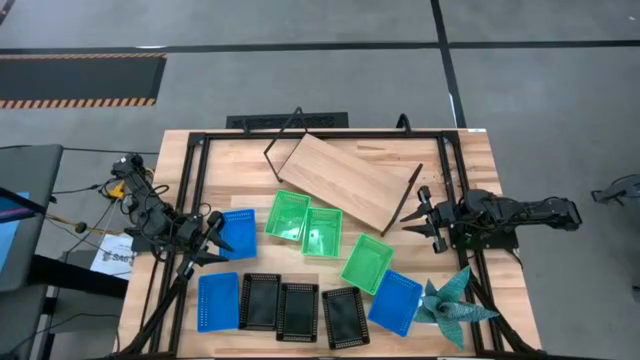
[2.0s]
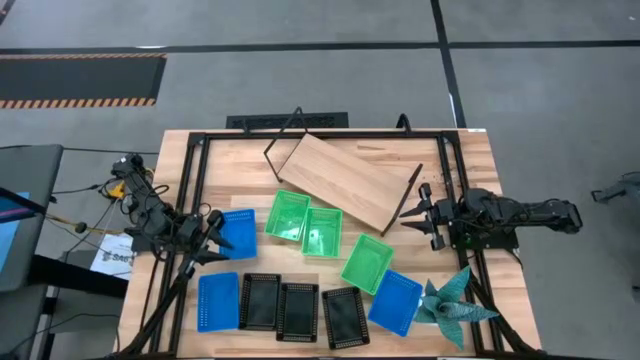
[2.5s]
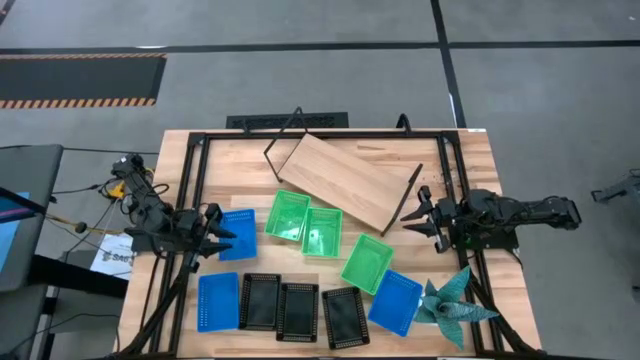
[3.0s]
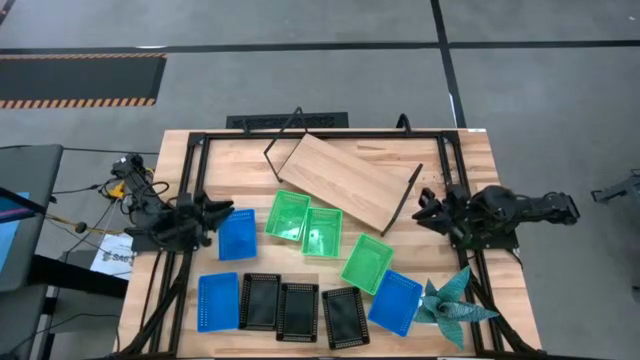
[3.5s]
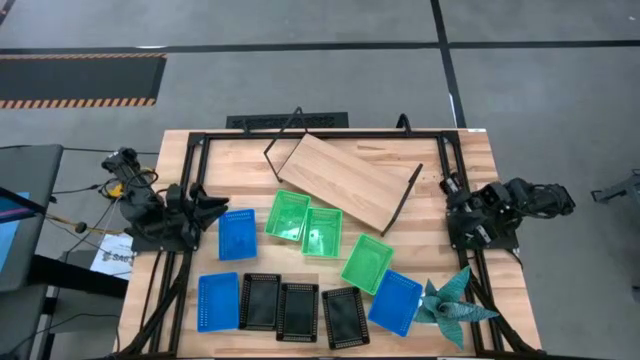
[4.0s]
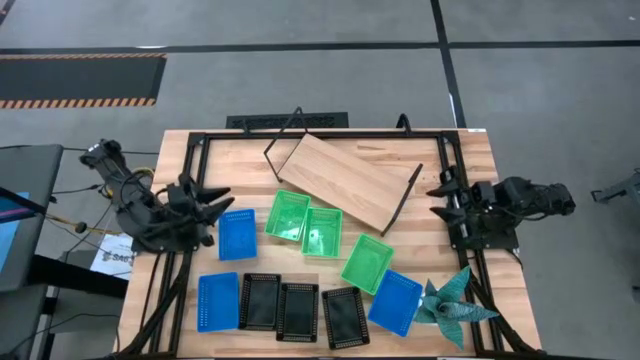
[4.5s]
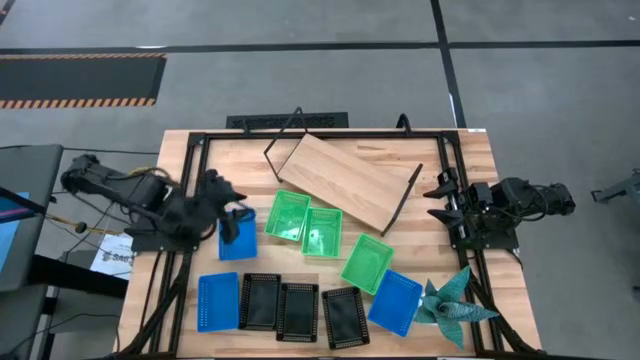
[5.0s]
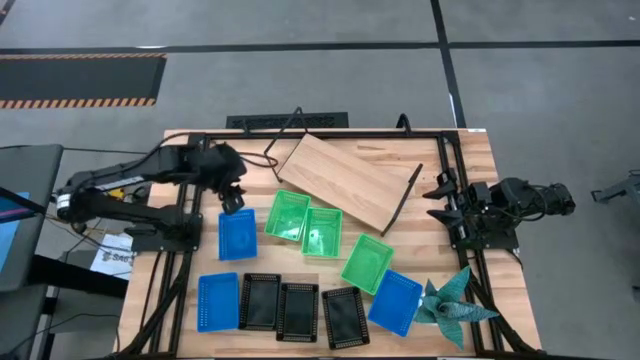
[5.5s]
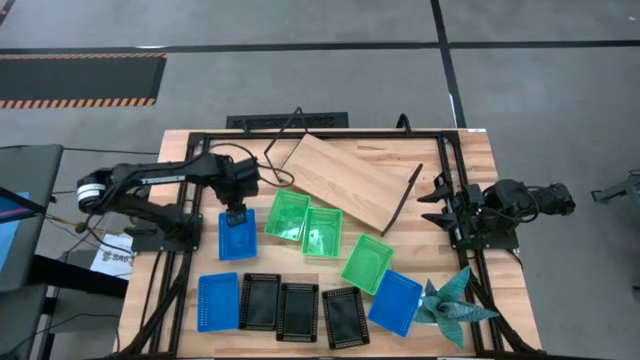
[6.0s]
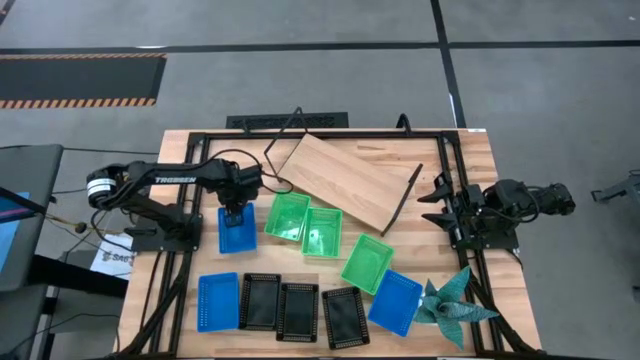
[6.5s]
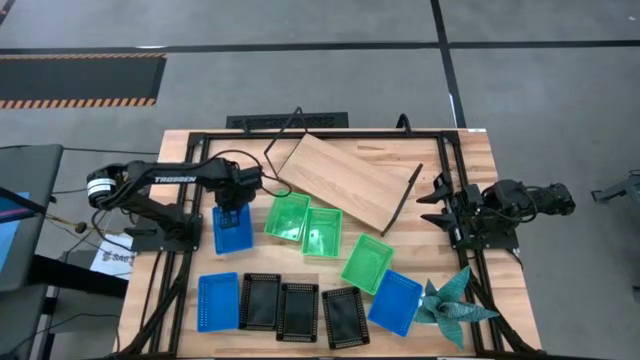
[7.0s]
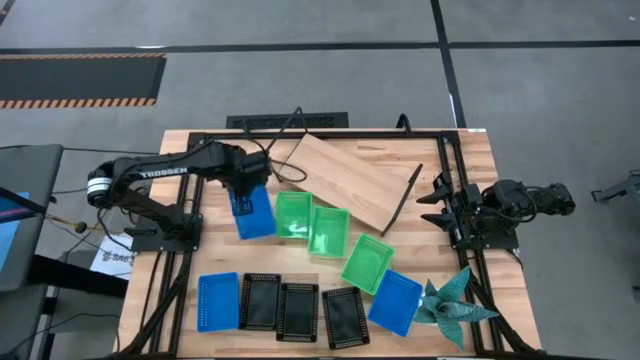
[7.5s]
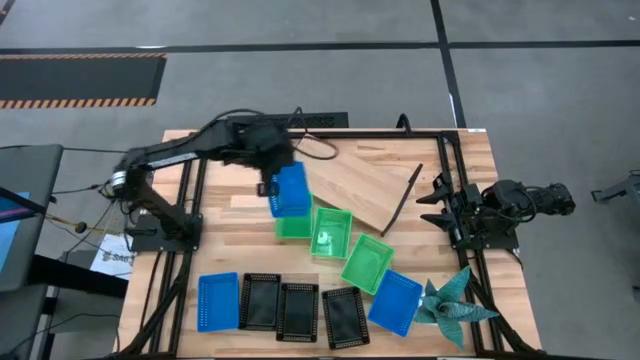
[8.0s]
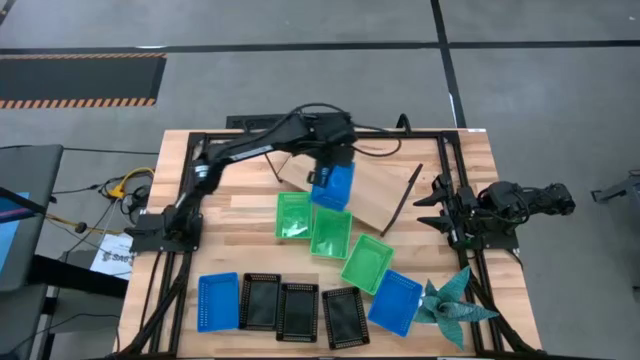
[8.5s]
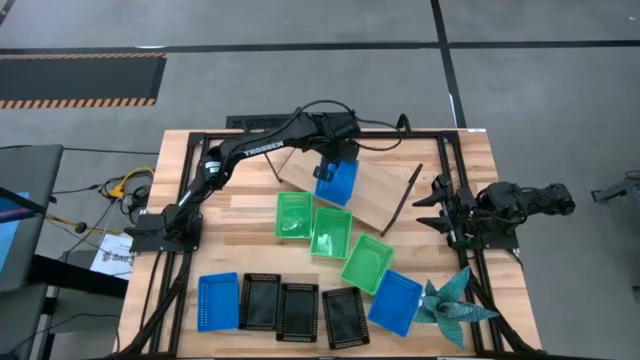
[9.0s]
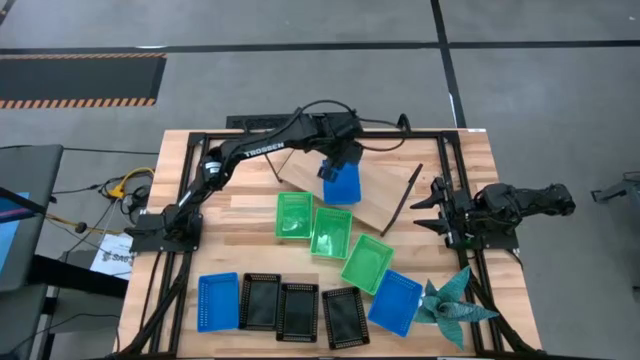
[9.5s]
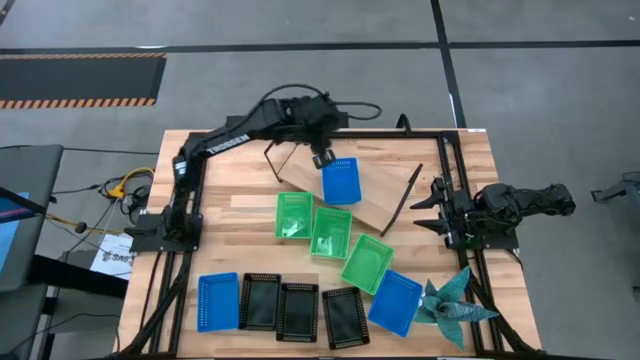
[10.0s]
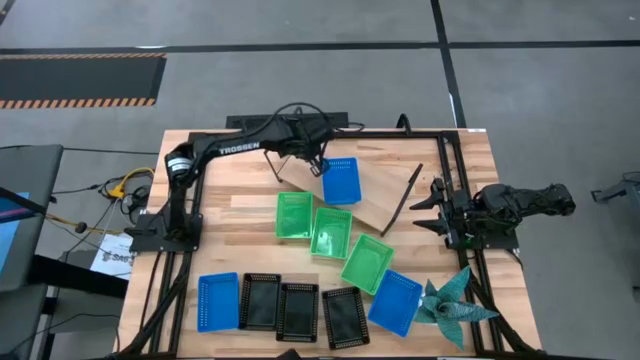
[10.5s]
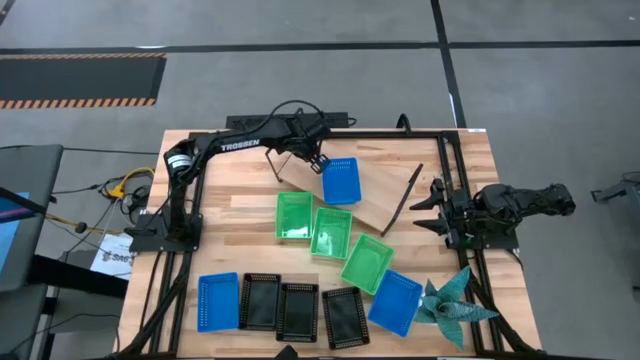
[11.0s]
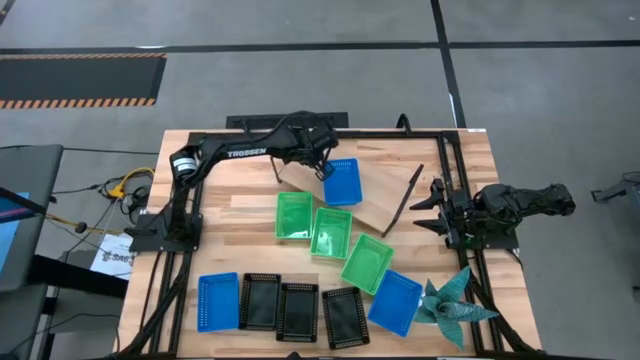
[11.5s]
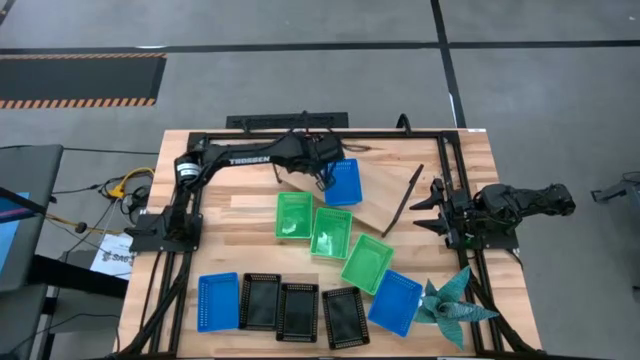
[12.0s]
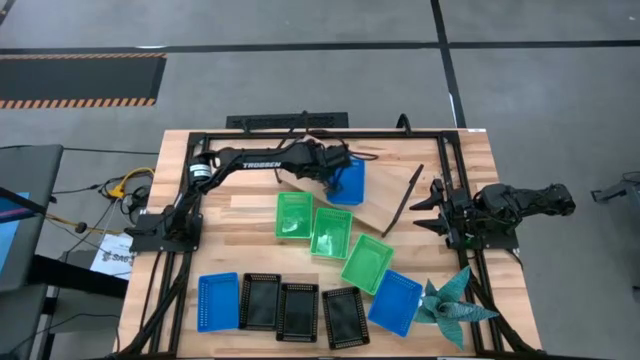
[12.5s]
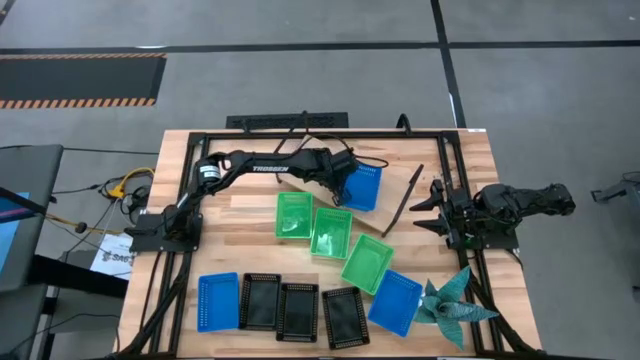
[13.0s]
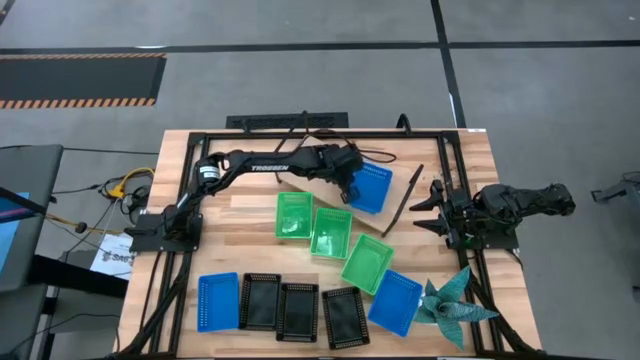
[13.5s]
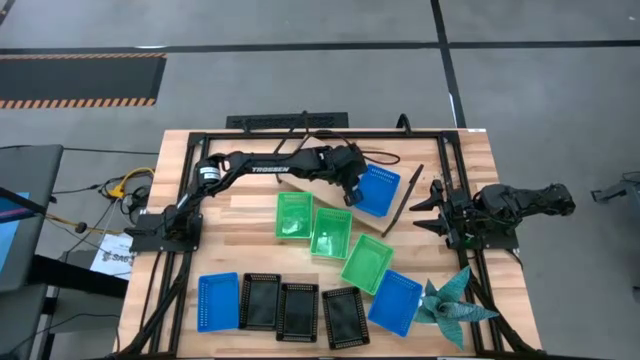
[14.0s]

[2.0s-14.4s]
Task: Stack baskets on shelf by color
Put the top left blue bin on the shelf

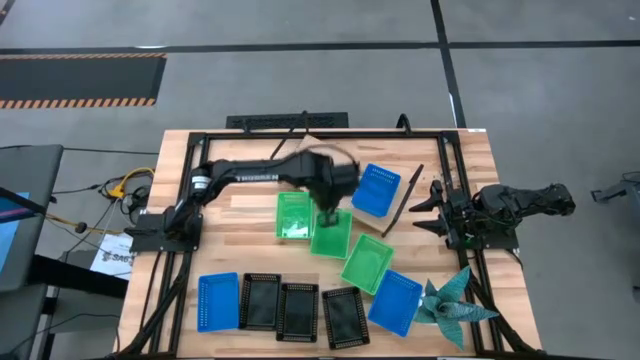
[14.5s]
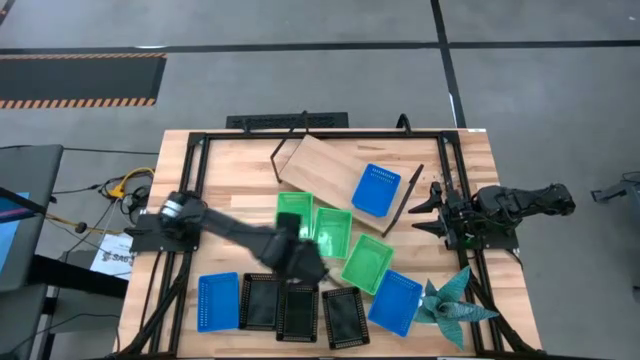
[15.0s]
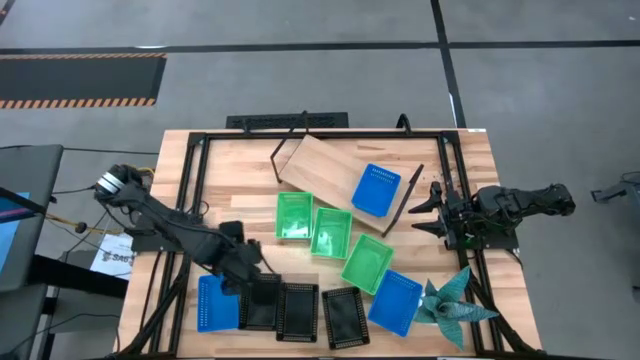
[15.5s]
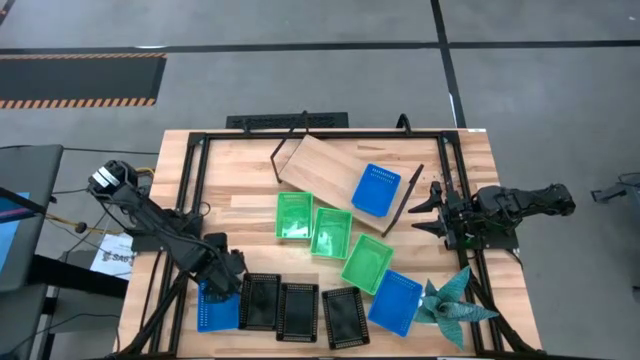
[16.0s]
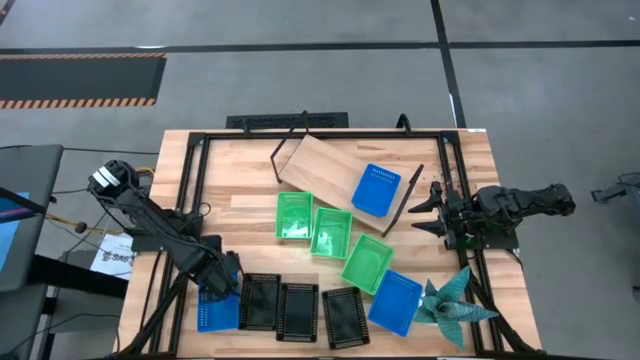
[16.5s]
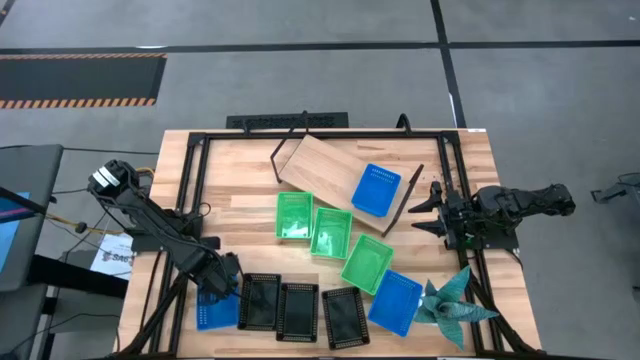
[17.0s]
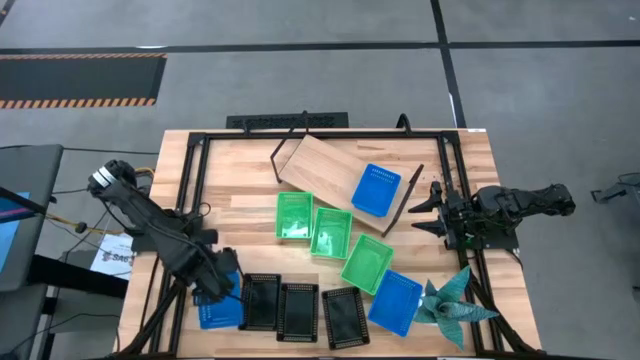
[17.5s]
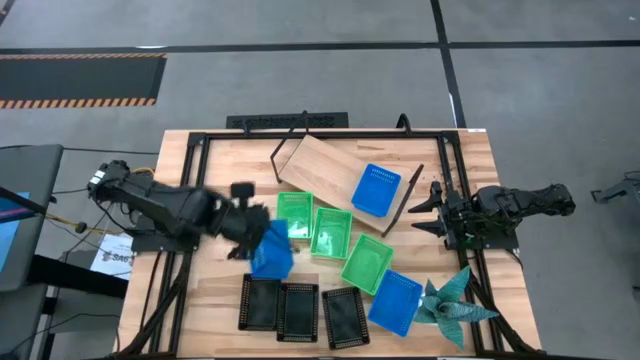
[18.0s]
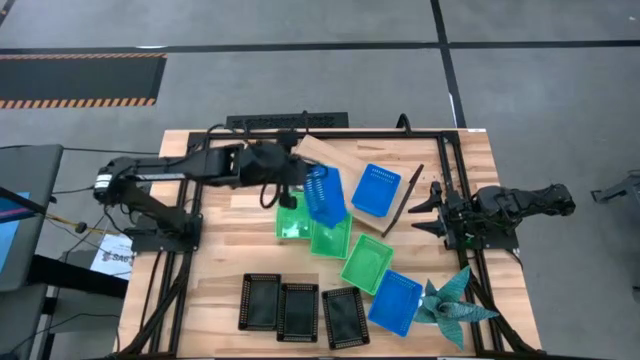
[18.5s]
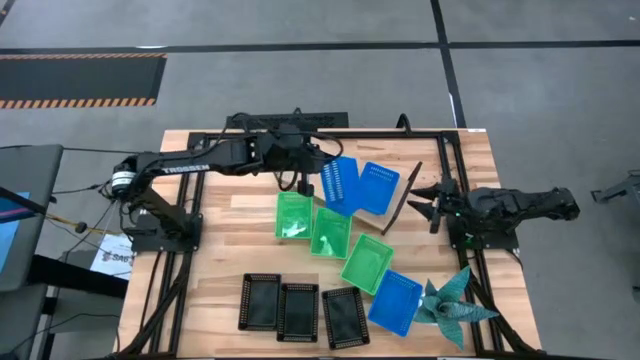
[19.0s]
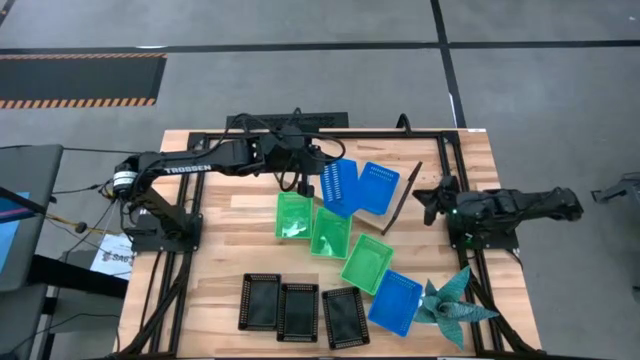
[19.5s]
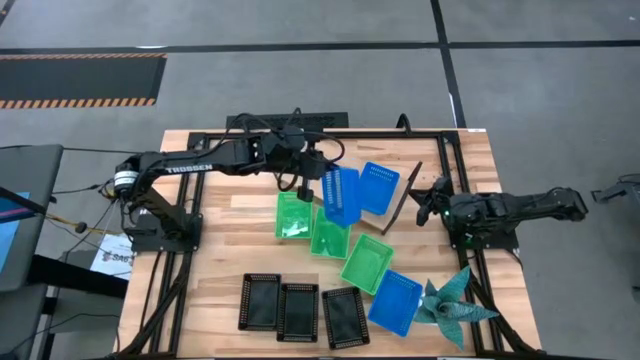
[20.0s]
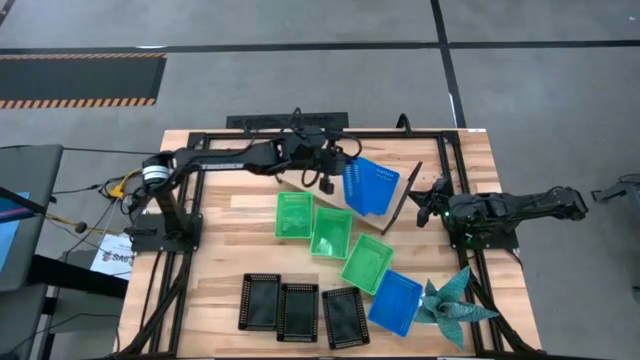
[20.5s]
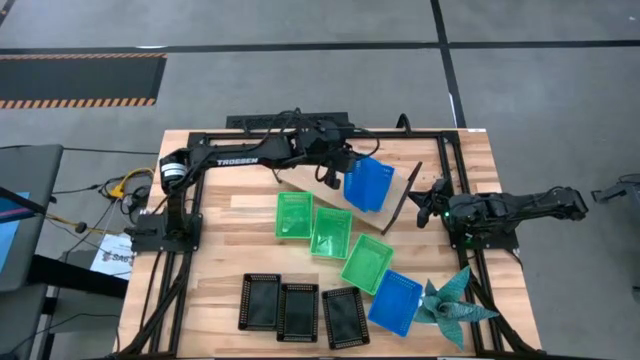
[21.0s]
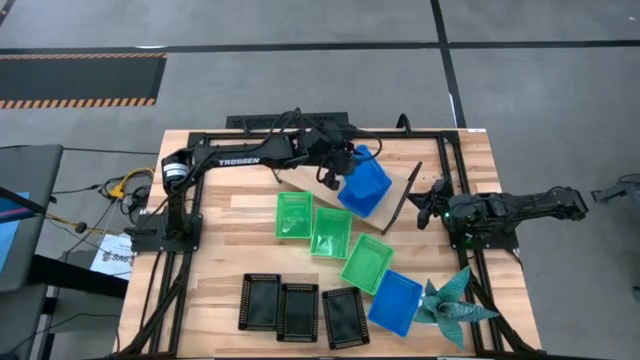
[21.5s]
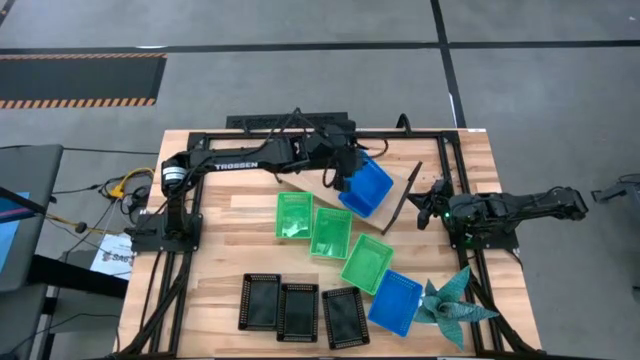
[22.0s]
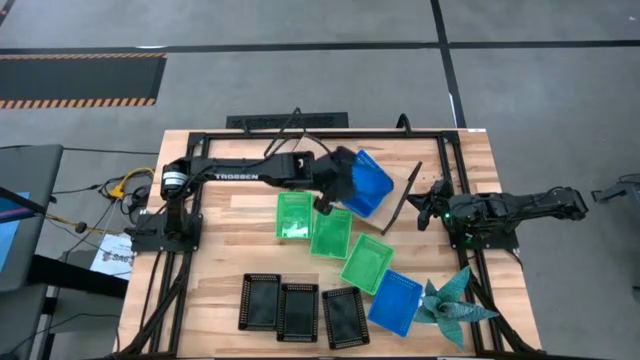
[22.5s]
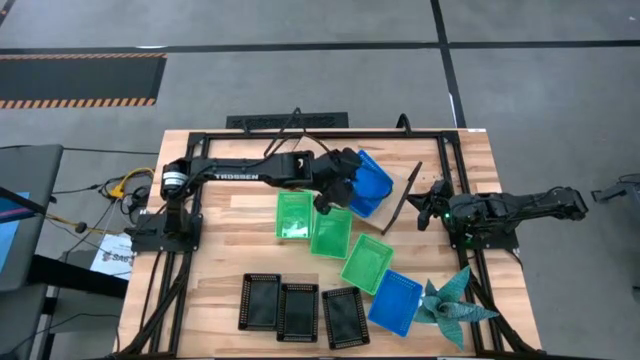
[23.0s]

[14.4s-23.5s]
Stack the left blue bin on the blue bin on the shelf

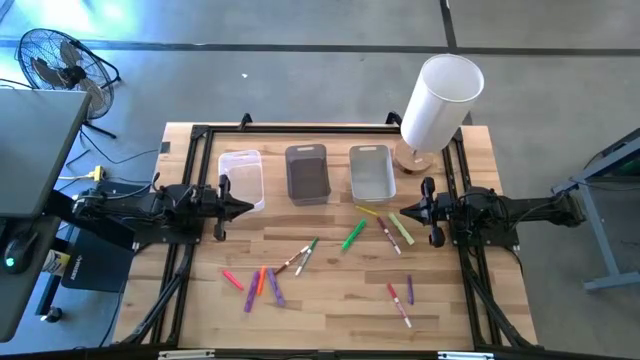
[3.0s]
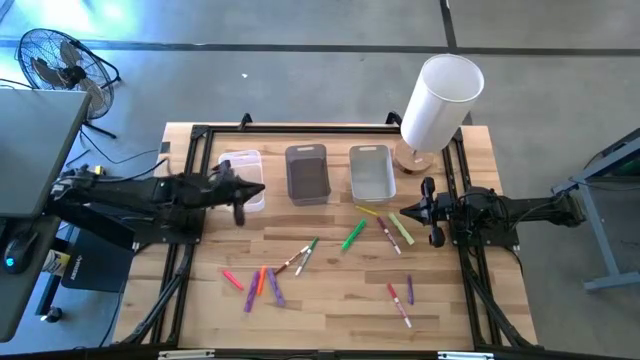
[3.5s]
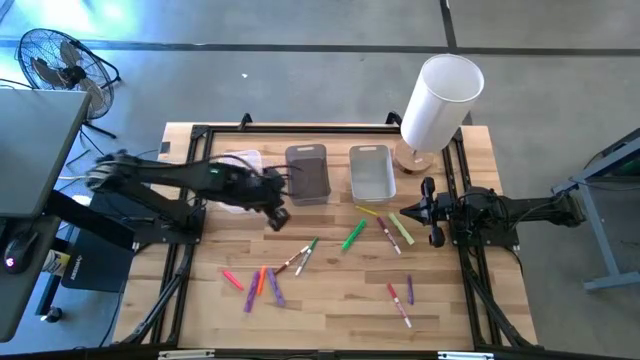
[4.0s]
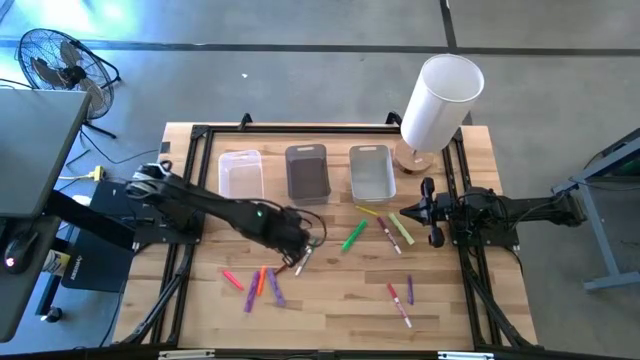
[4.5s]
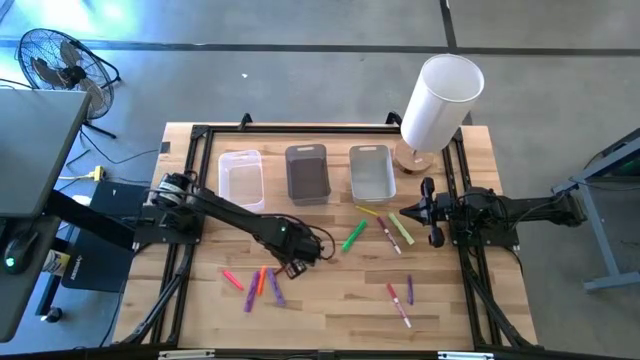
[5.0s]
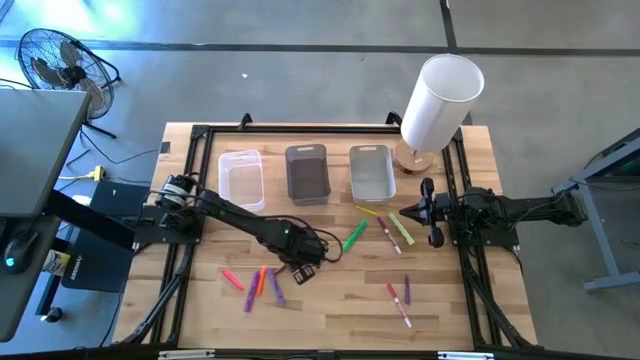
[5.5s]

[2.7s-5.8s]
Task: Pick & Place Markers
Put the brown marker pen into the transparent bin
